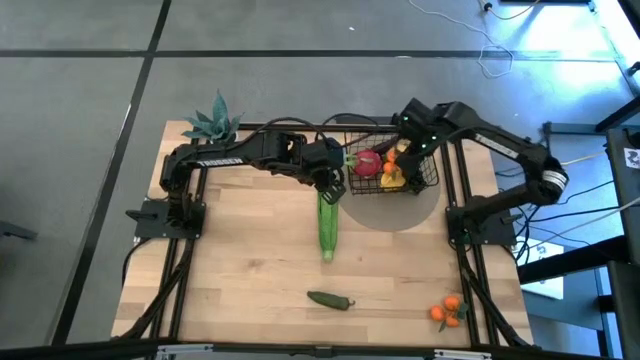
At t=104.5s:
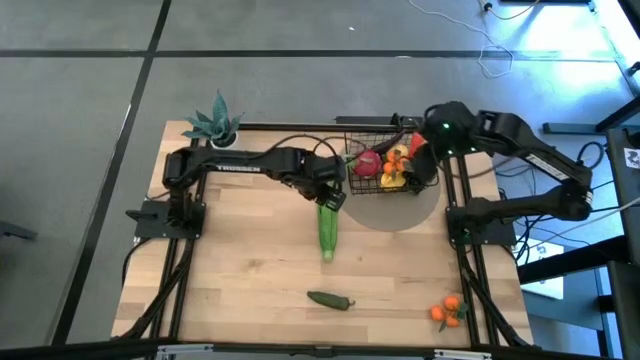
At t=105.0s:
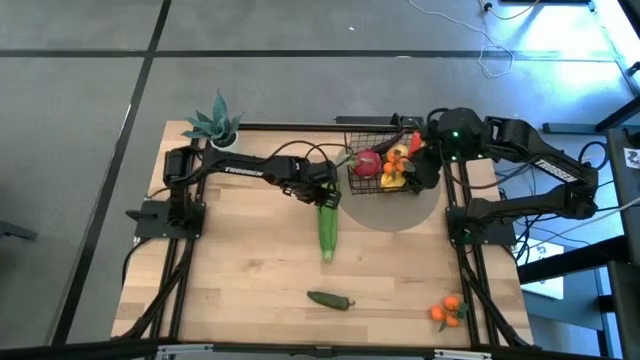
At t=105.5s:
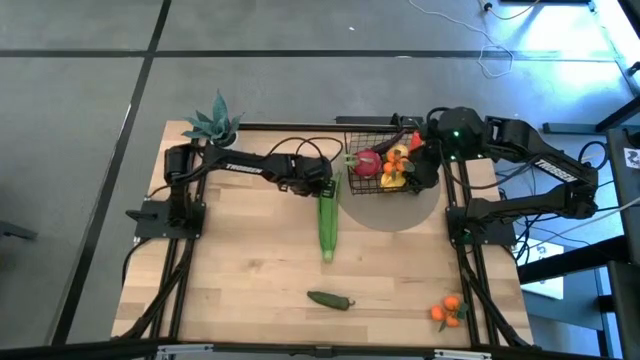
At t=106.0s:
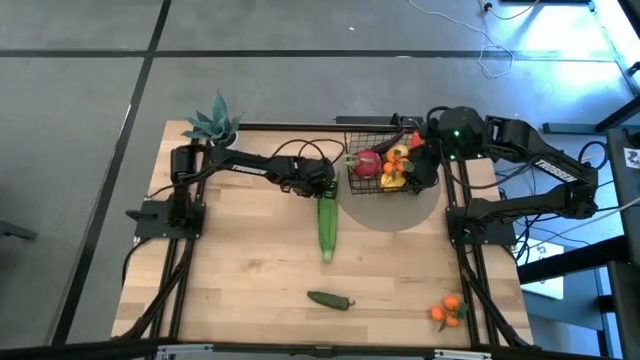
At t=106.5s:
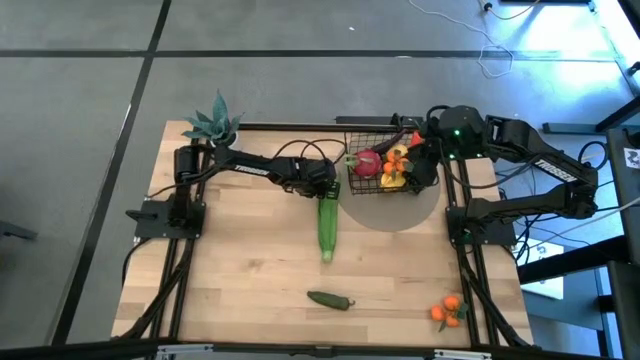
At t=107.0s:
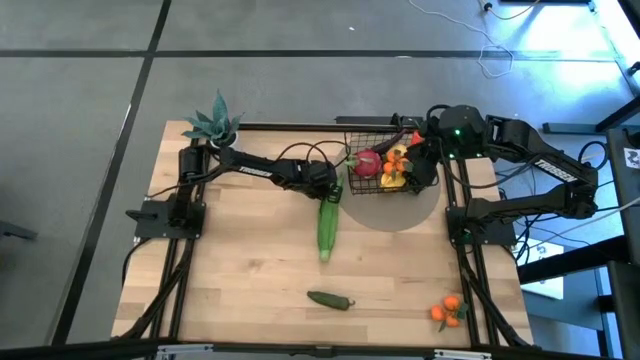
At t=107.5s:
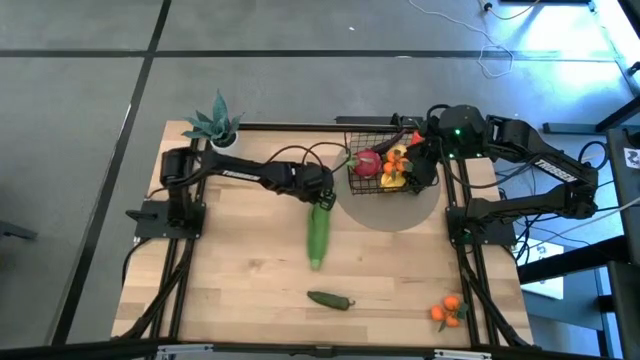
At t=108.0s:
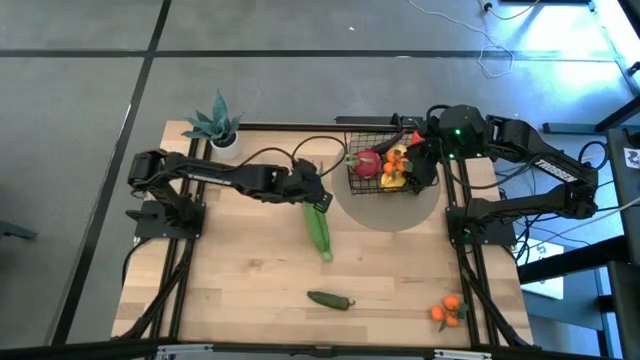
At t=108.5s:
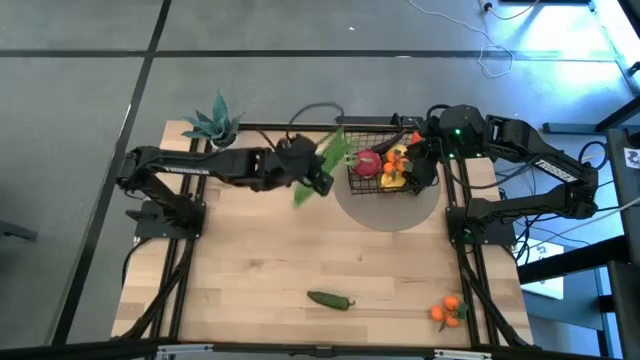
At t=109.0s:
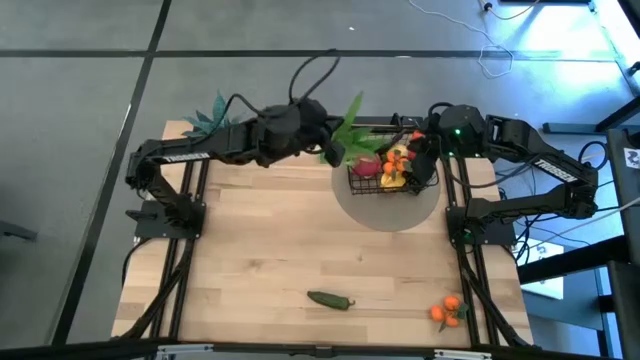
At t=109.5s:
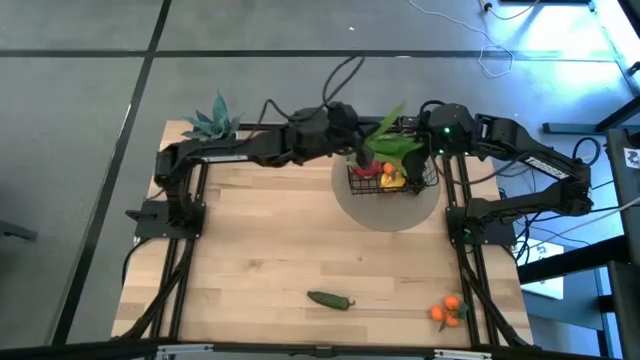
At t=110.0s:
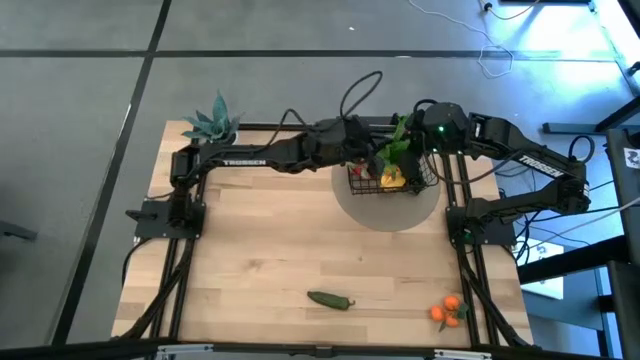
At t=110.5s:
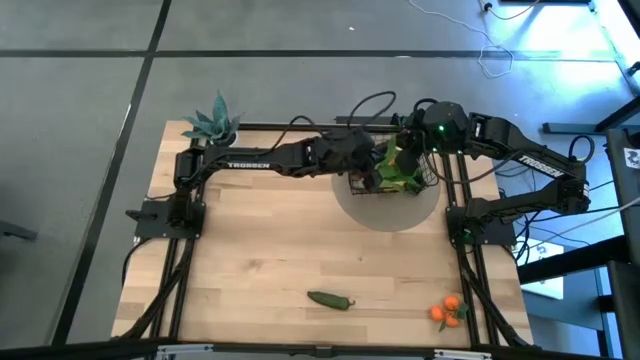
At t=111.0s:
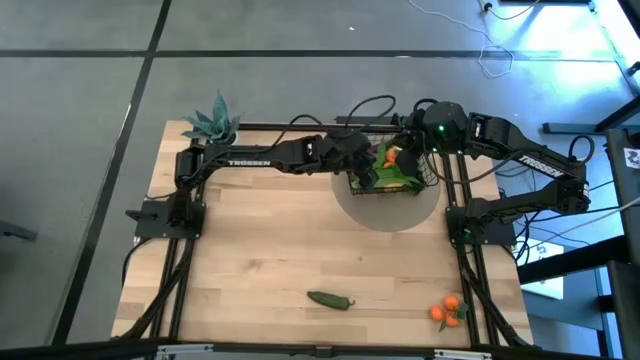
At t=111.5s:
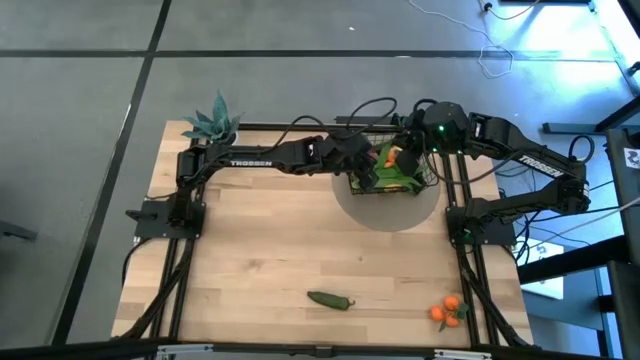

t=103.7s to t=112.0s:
Task: Build produce basket
Put the lettuce into the black wire basket

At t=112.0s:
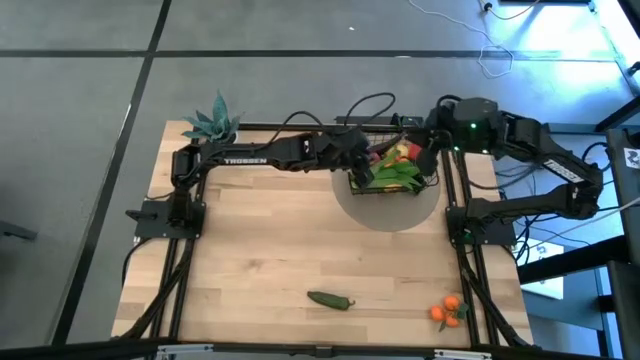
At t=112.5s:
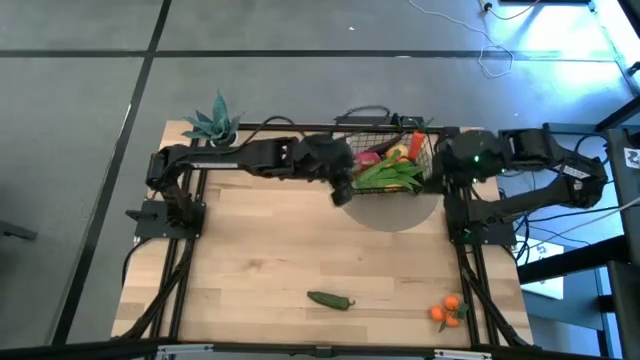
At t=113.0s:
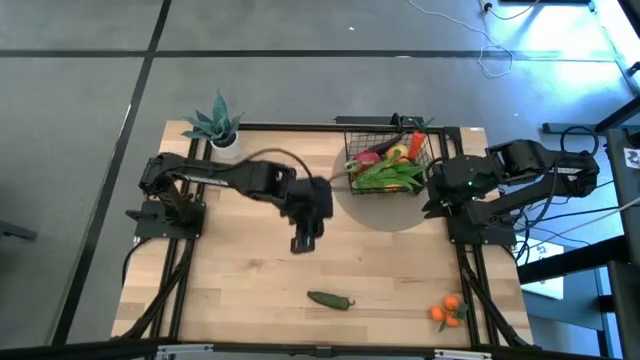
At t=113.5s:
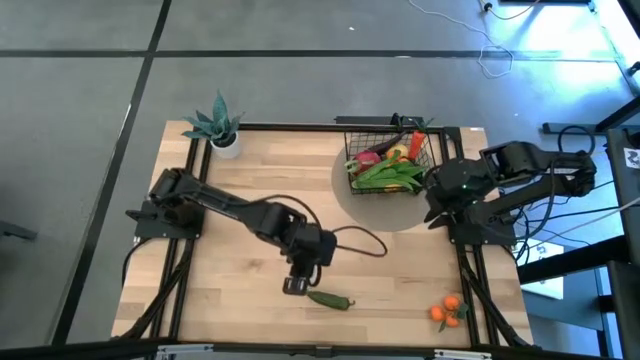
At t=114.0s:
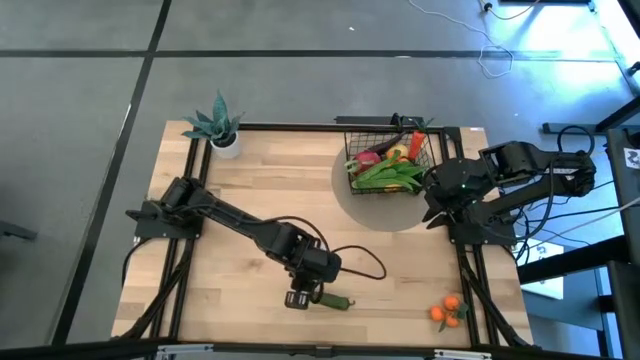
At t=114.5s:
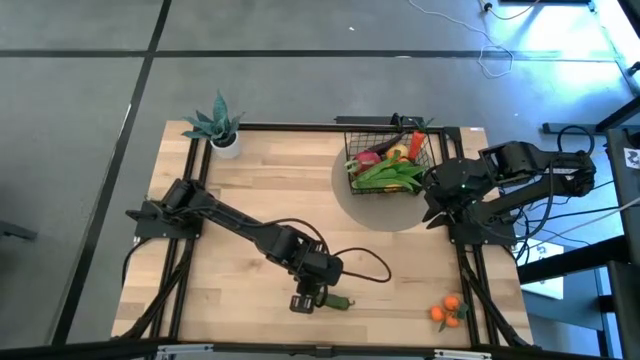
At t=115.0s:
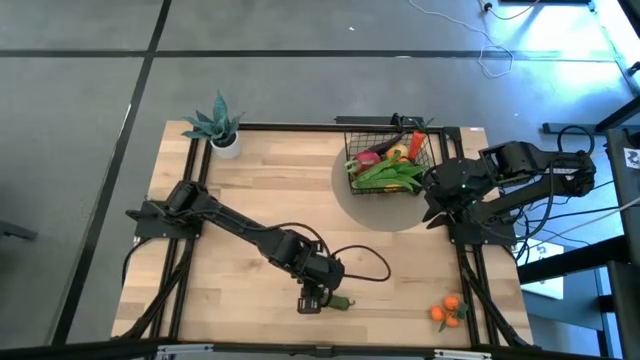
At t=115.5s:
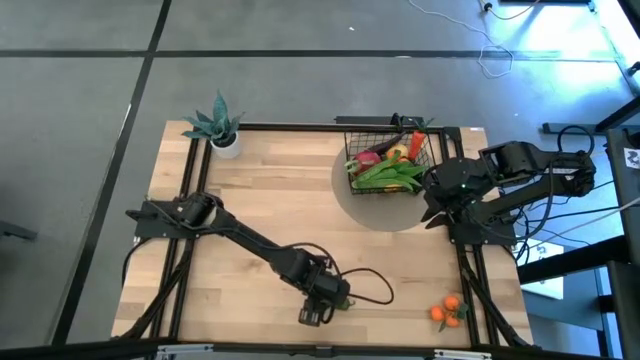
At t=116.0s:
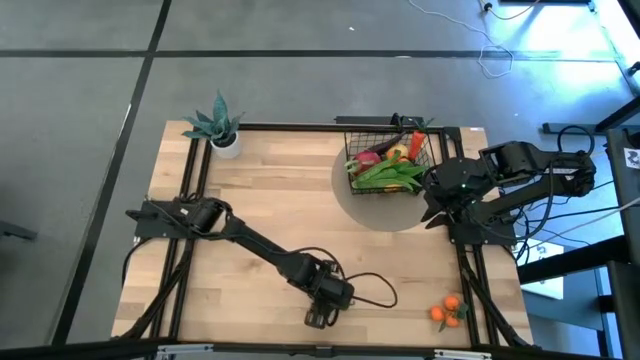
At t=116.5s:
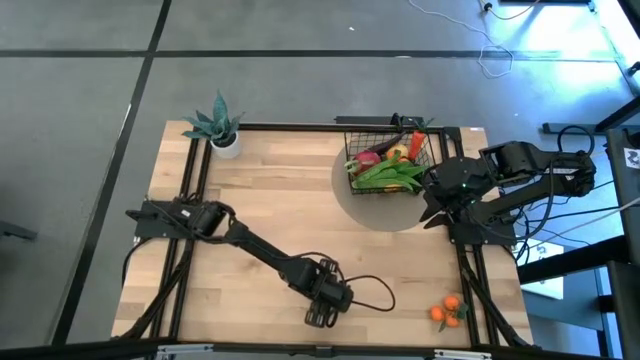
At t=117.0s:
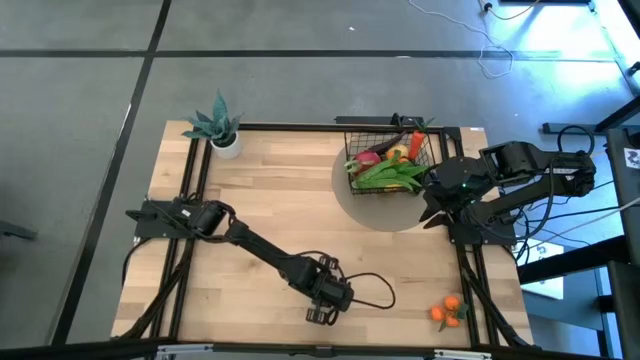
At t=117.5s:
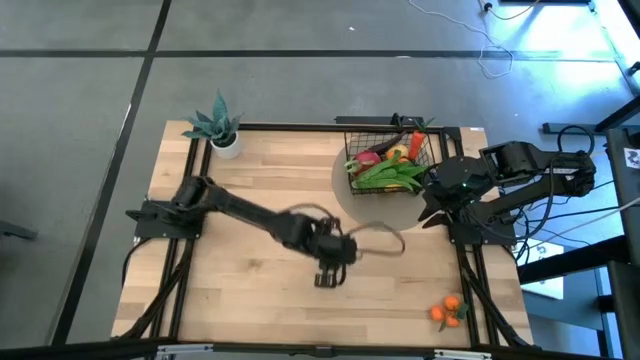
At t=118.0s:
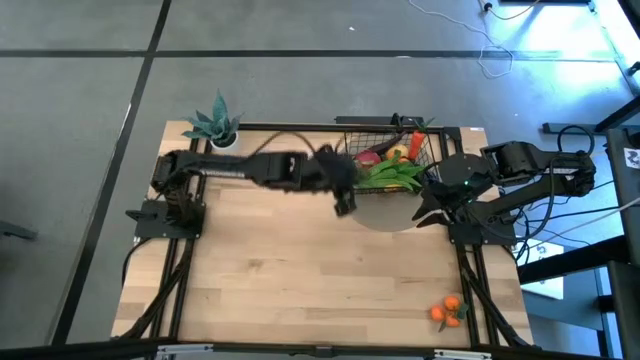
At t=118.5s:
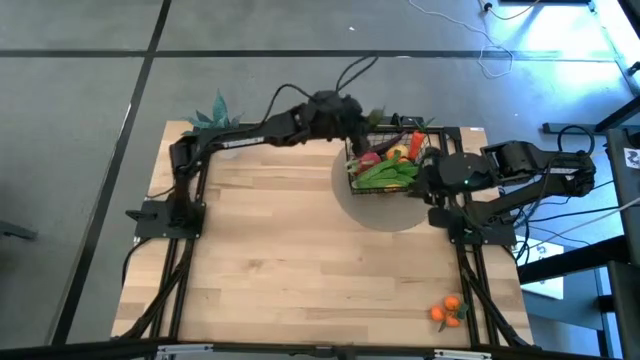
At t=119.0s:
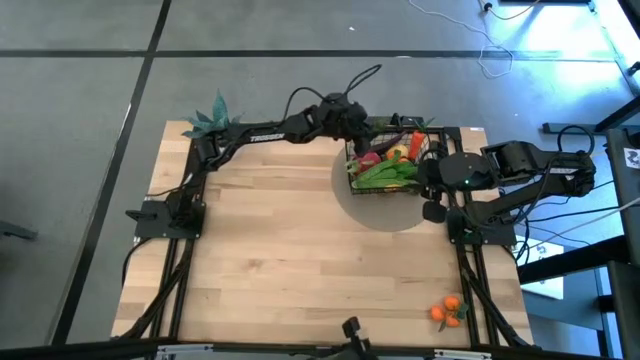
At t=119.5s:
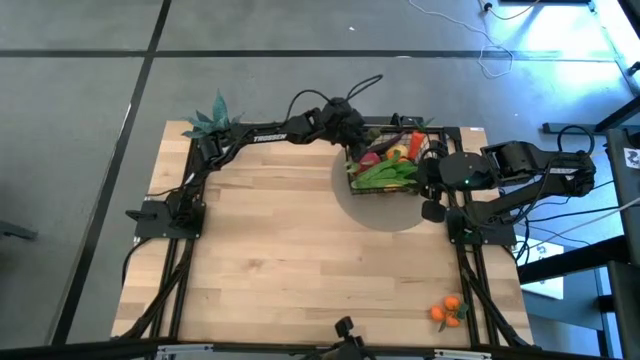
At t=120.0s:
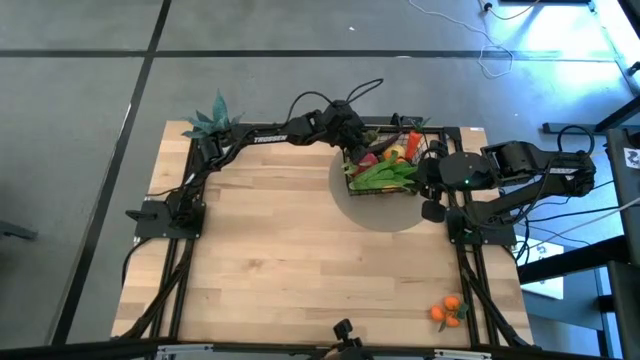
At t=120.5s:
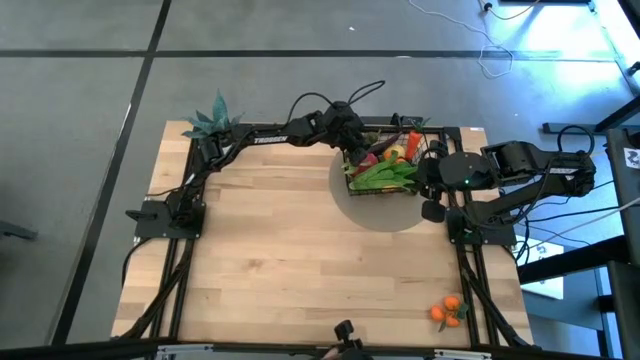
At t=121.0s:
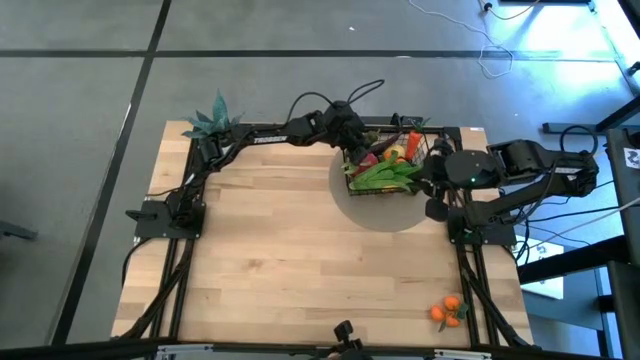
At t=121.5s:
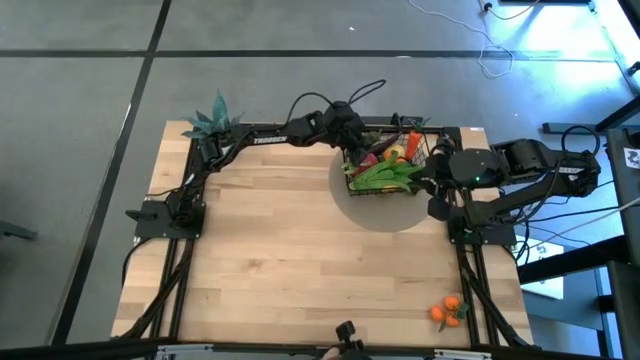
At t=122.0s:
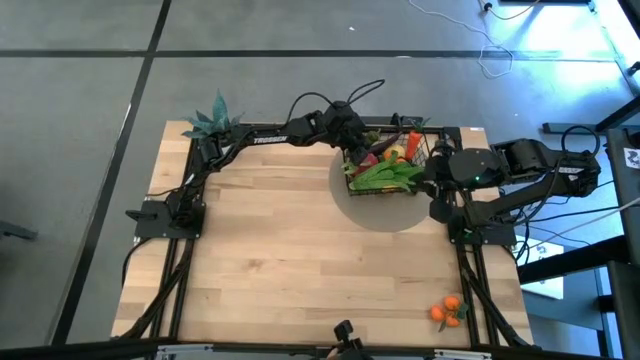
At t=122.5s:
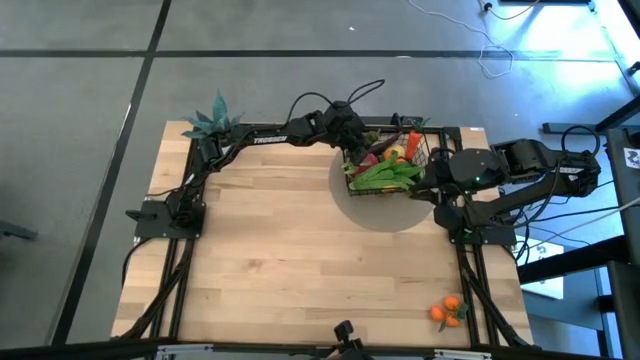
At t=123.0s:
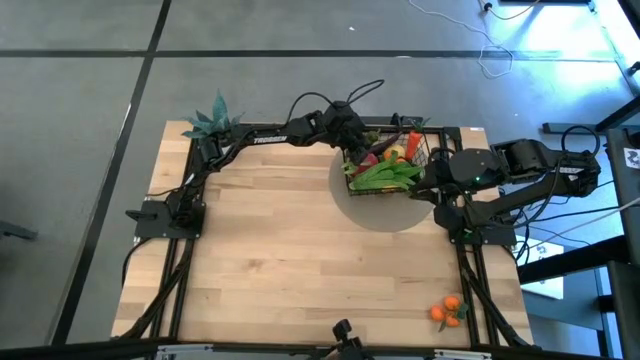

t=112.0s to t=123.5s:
Put the chili pepper into the black wire basket

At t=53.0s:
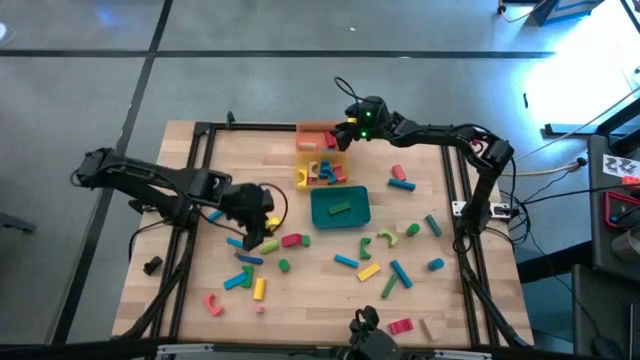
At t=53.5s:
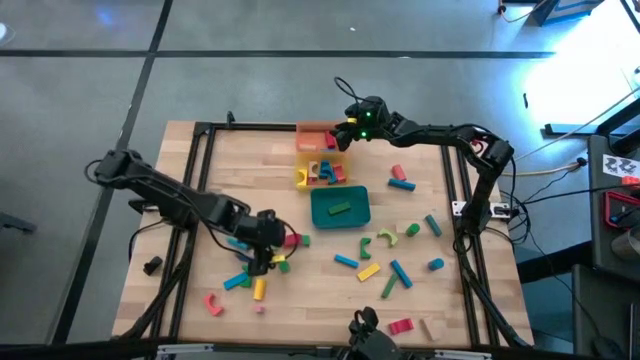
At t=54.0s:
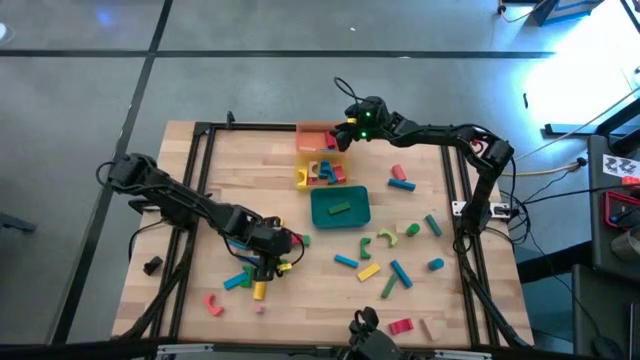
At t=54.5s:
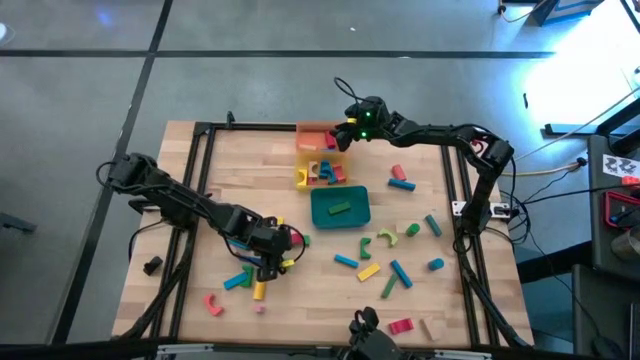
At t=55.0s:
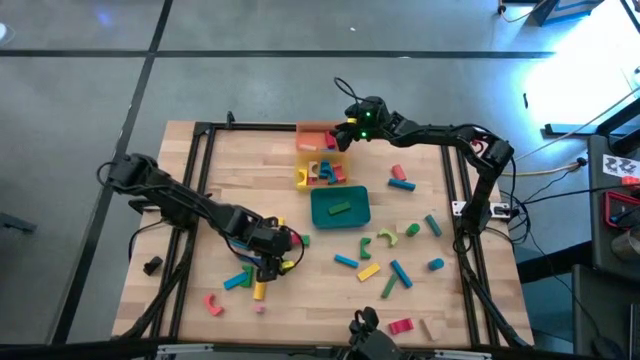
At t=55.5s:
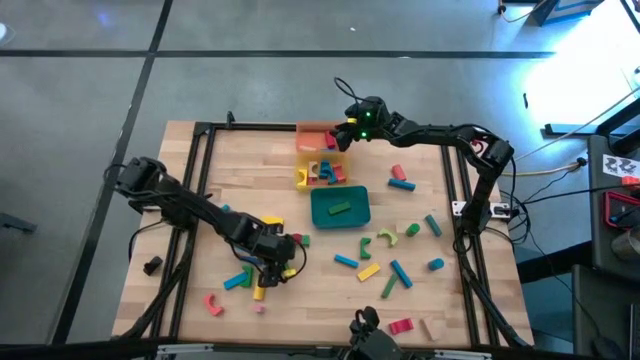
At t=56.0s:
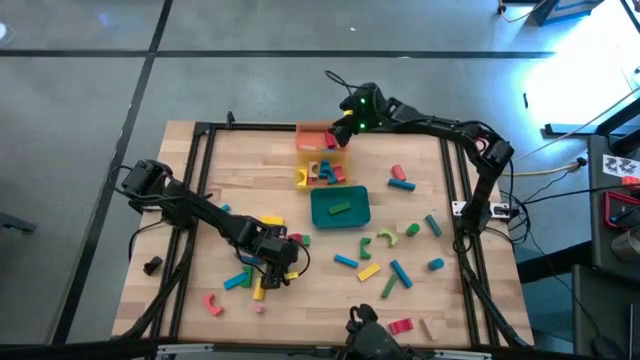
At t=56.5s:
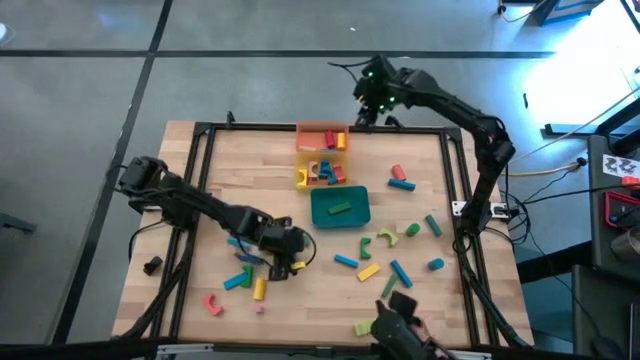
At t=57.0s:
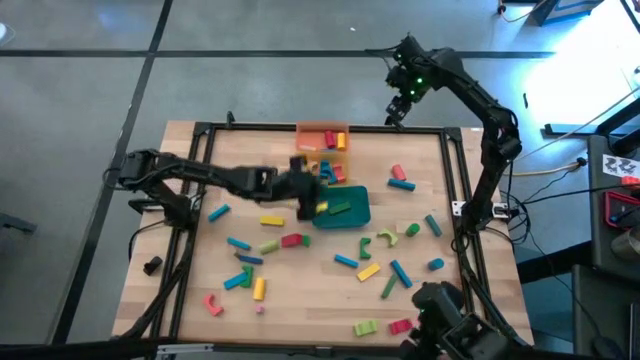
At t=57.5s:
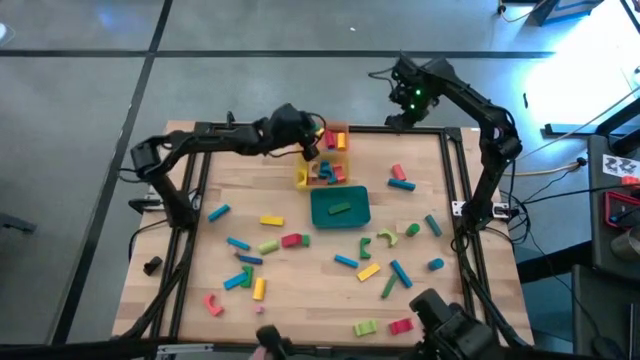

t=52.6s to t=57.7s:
Task: Sort blocks by size
Put the green cylinder block into the orange bin
